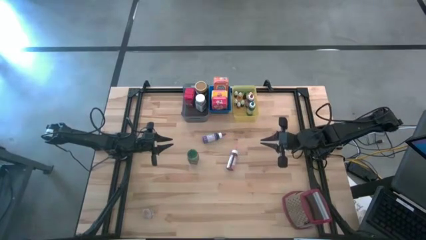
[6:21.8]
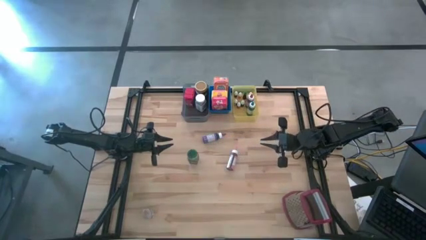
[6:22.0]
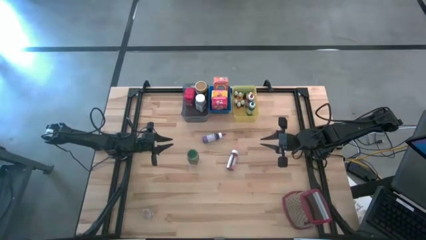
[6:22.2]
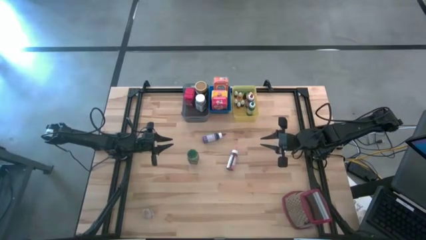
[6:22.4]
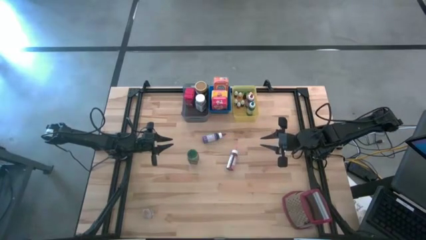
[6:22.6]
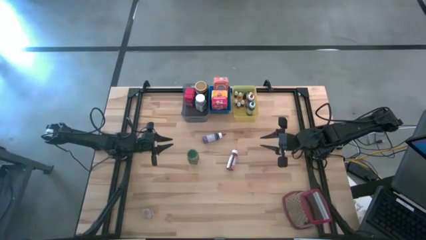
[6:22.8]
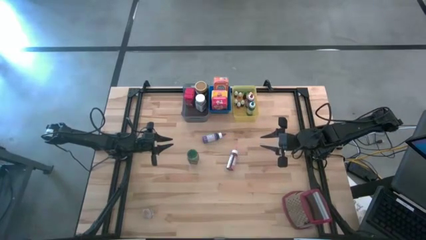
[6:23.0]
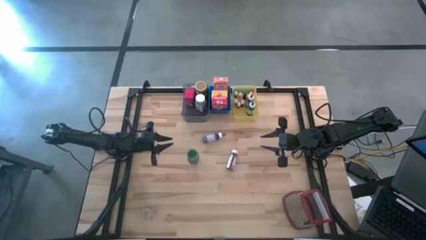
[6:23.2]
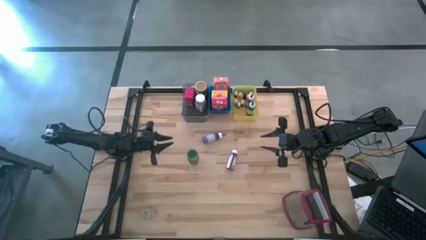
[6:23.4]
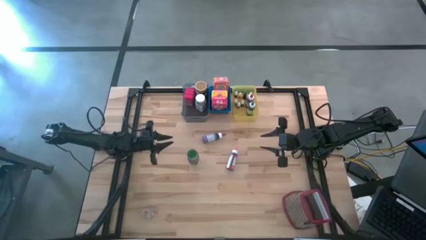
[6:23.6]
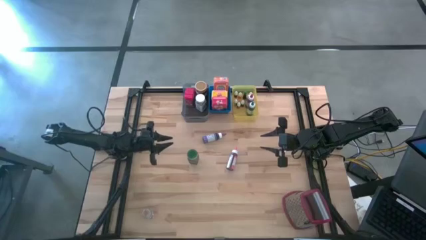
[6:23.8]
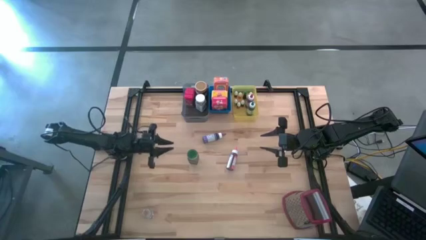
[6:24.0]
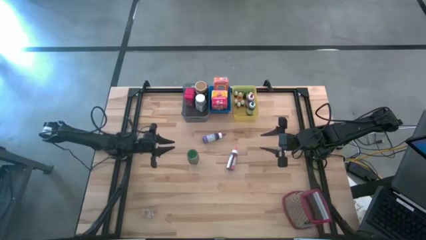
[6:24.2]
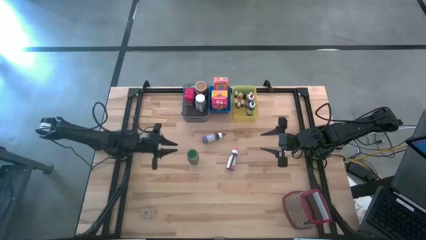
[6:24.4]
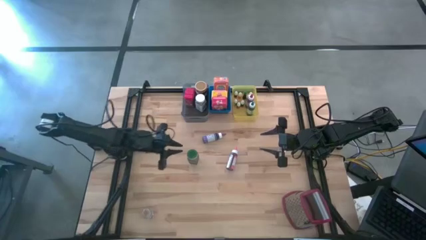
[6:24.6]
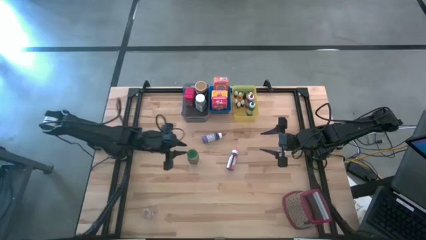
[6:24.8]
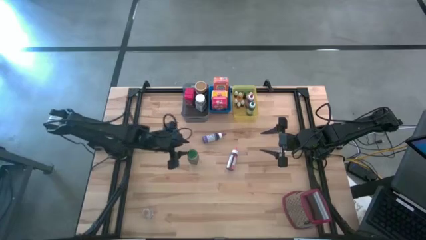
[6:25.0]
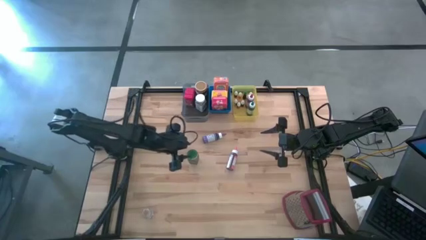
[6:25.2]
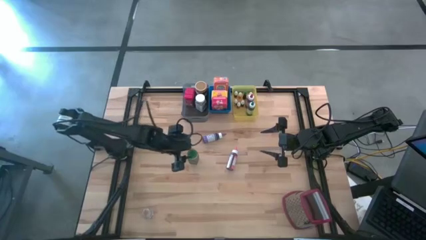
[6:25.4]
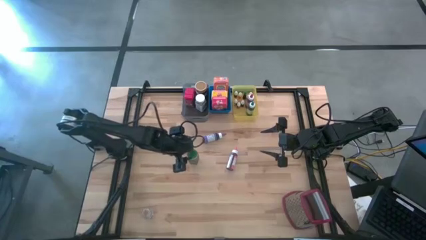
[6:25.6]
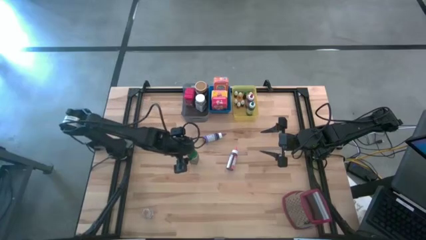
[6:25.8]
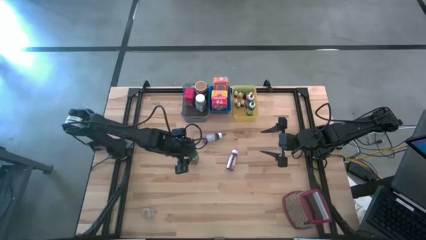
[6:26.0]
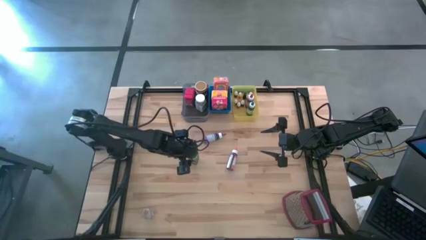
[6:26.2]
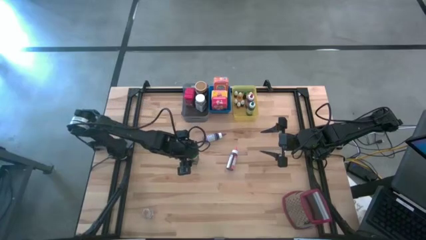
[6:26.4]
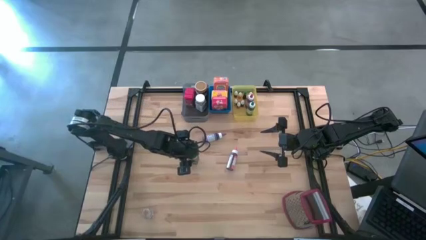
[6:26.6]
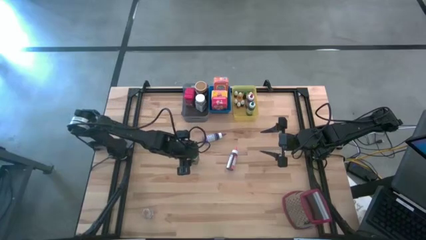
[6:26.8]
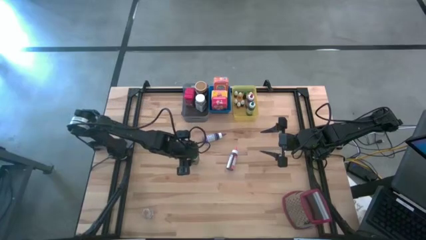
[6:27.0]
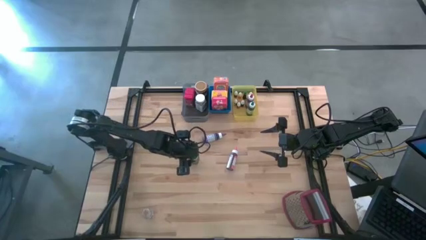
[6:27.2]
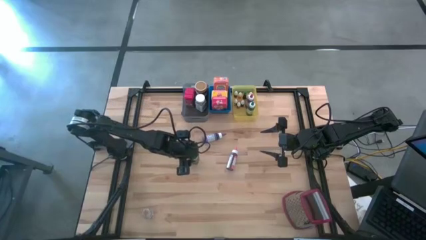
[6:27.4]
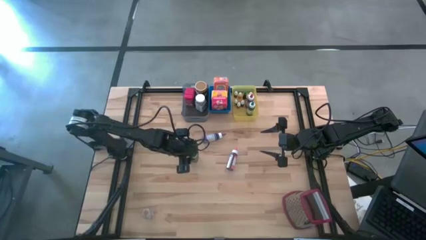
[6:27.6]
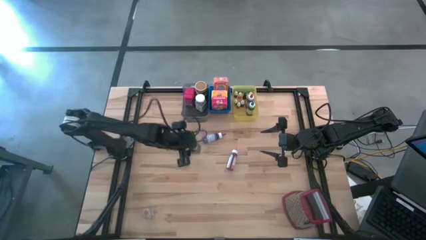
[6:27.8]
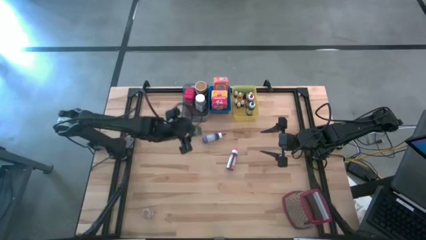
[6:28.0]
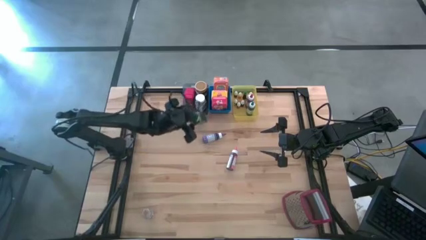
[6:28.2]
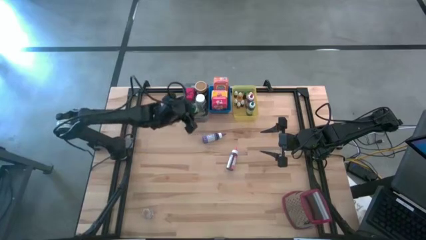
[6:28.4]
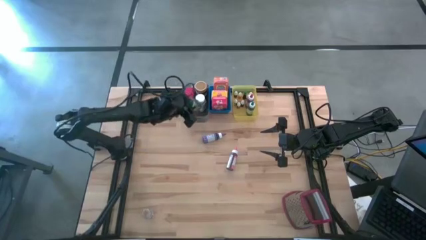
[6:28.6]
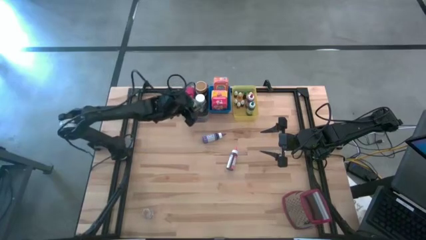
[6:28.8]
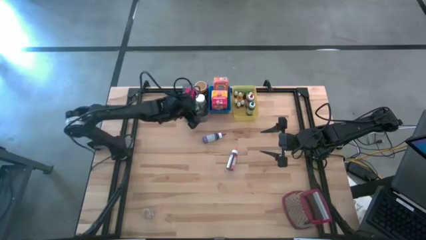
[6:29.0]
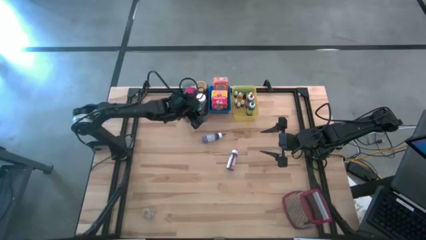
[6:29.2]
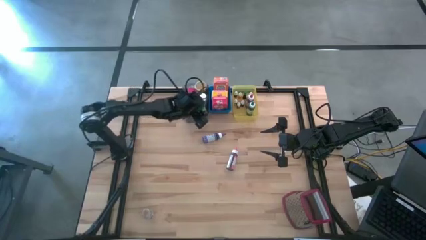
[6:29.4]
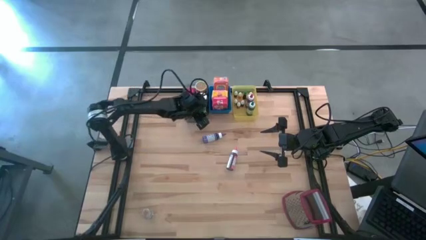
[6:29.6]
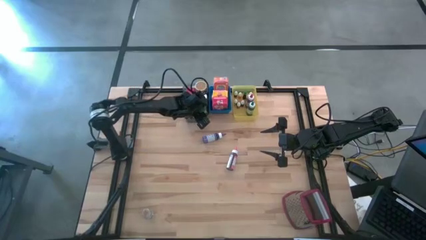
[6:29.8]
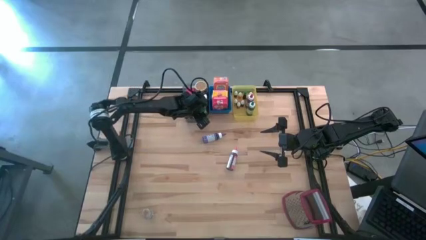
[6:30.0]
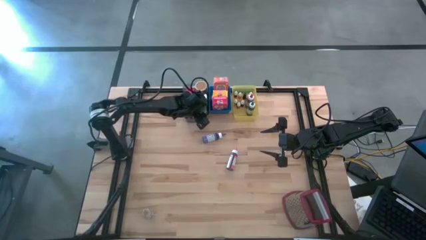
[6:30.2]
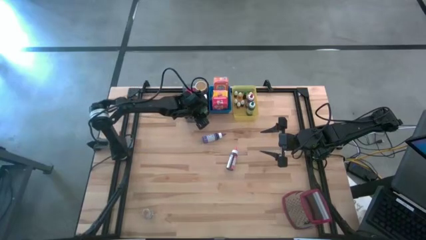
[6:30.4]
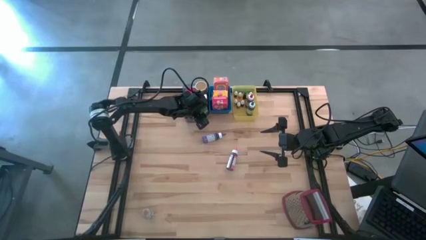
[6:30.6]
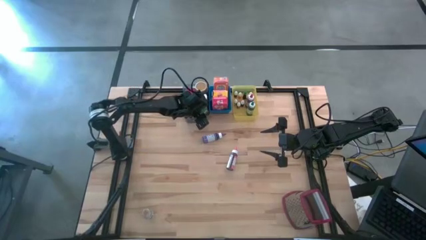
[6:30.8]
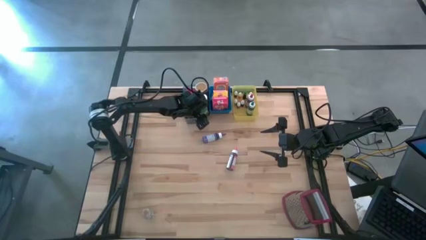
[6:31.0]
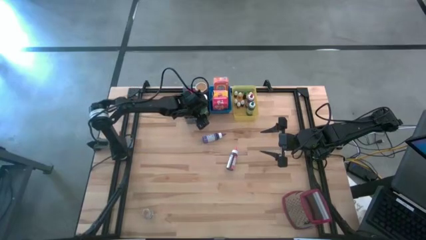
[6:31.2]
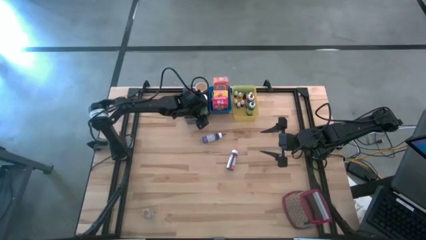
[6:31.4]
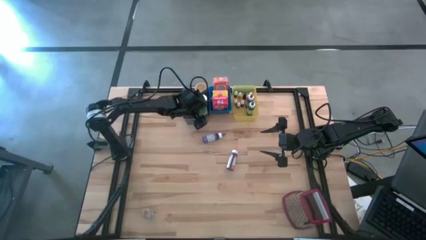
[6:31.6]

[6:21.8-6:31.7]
Task: Pick & Place Kitchen Items
Put the green spice bottle into the black bin

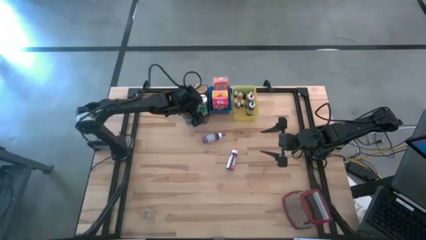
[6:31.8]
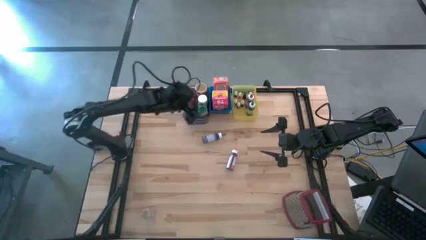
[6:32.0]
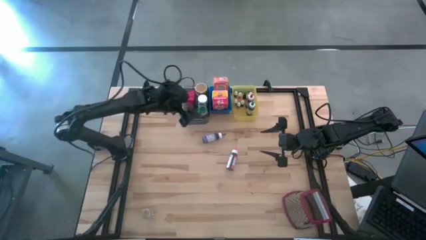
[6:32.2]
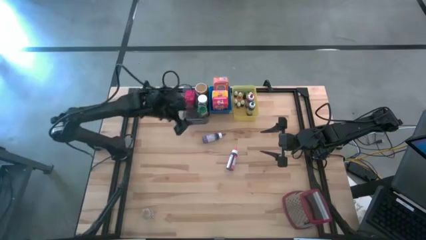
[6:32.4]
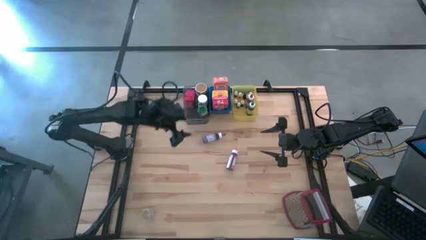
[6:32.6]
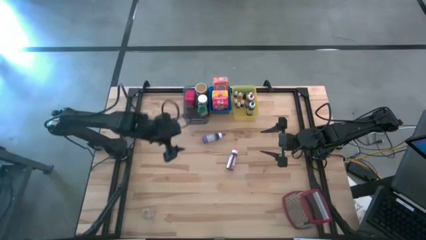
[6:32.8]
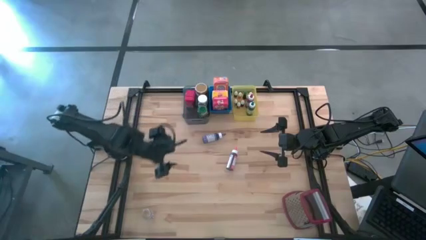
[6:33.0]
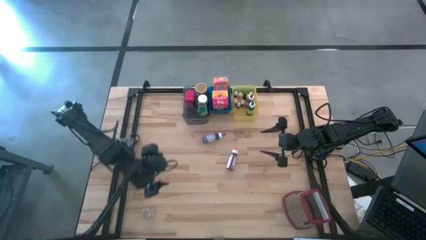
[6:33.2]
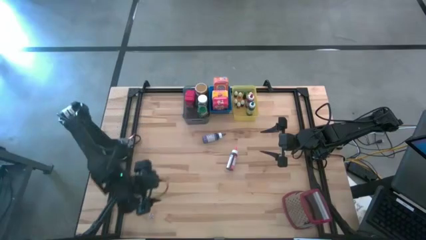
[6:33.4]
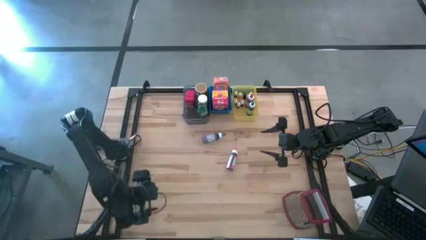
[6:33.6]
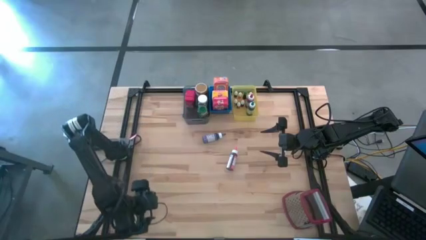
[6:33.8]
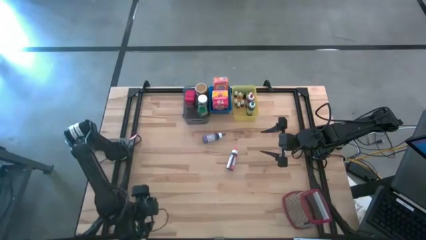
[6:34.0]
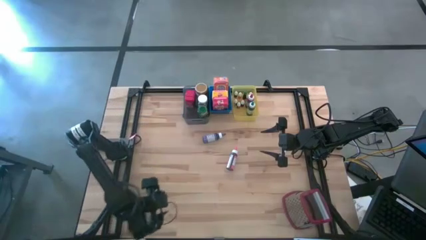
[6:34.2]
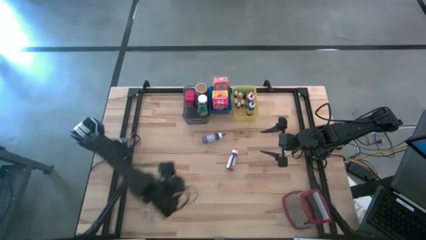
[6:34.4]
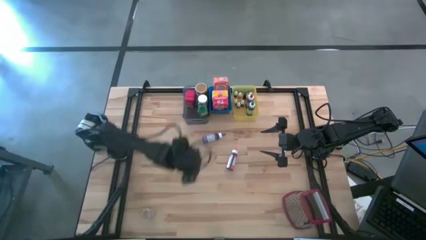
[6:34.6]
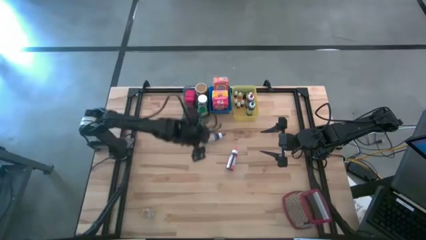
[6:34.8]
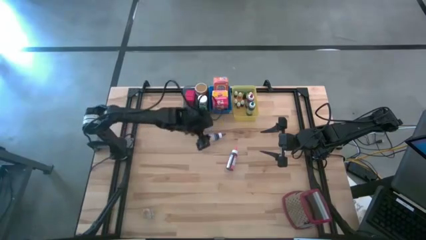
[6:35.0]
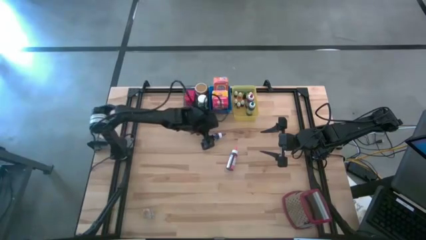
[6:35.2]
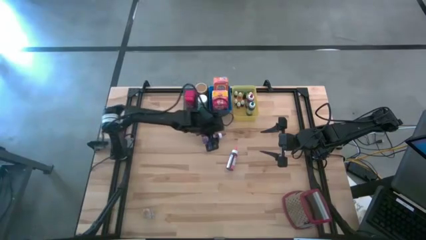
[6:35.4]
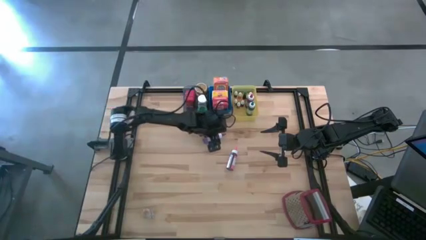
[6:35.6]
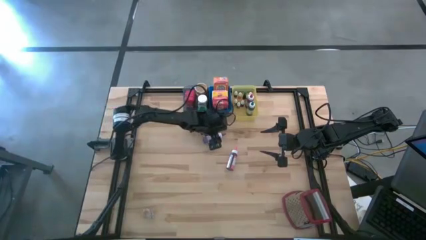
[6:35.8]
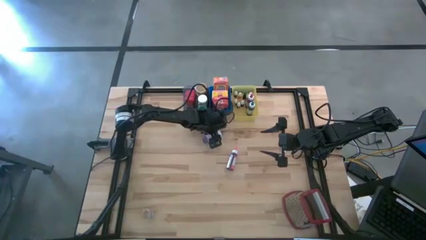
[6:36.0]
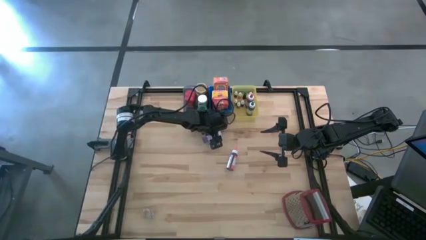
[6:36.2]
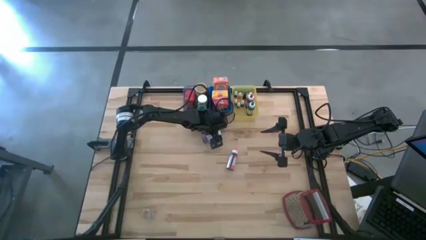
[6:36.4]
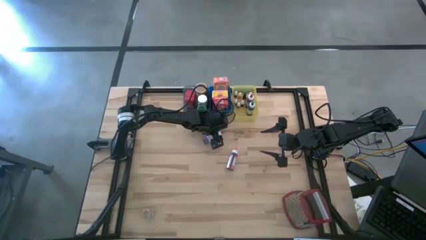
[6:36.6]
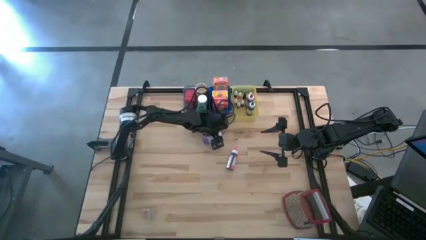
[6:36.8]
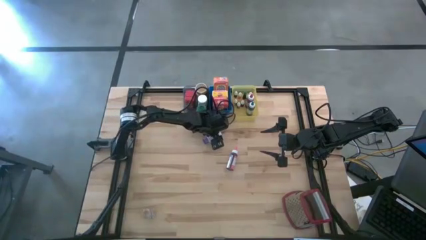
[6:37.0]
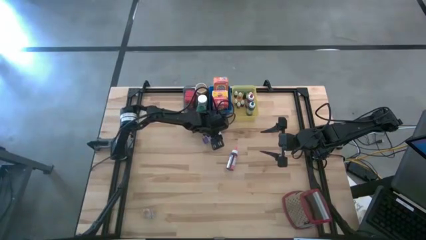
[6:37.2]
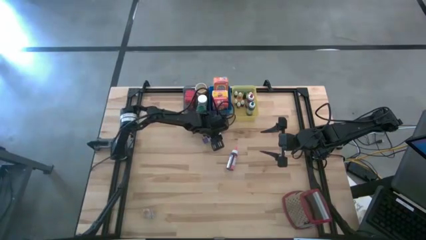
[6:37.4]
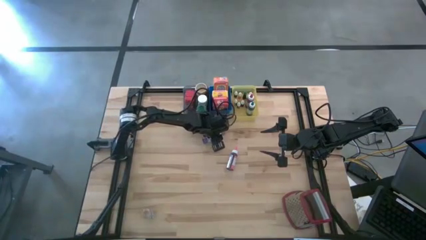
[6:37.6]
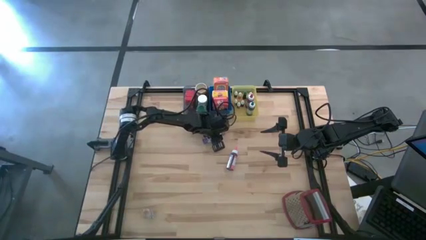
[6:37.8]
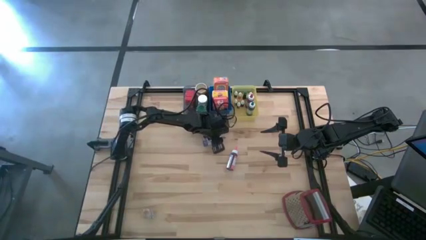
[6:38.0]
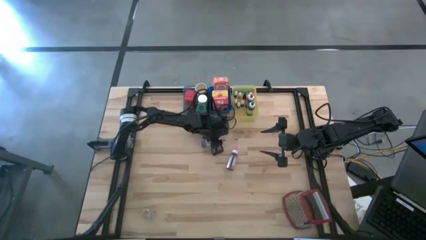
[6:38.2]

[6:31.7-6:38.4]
Put the large violet food coloring bottle into the yellow bin
